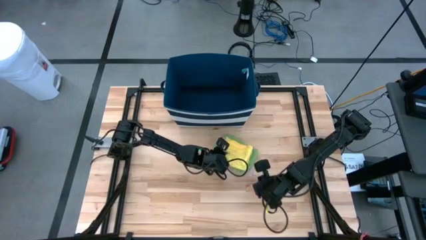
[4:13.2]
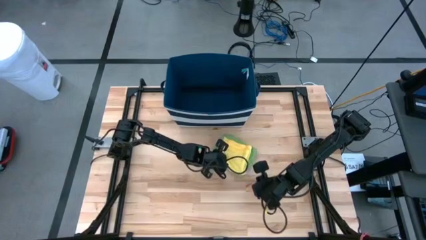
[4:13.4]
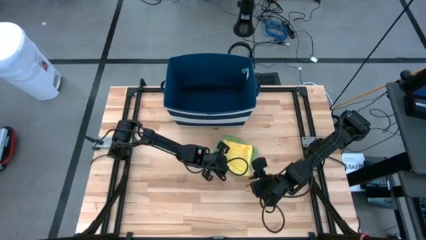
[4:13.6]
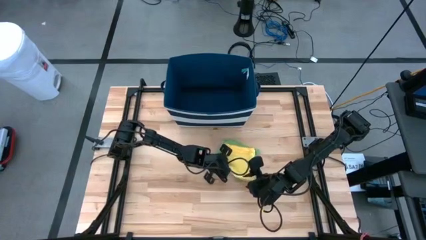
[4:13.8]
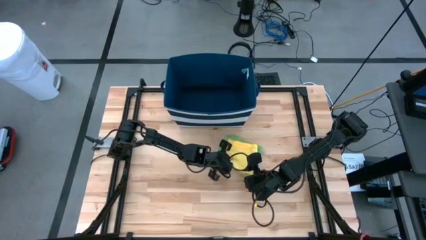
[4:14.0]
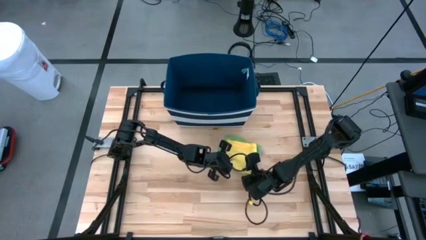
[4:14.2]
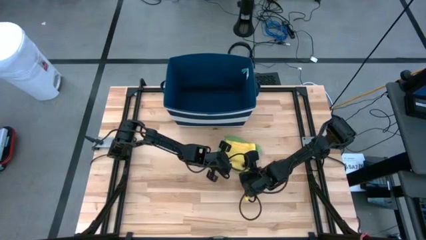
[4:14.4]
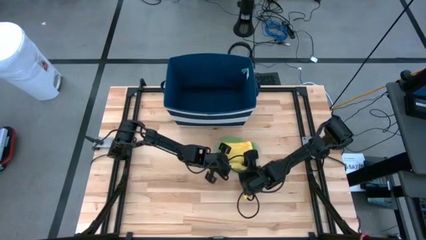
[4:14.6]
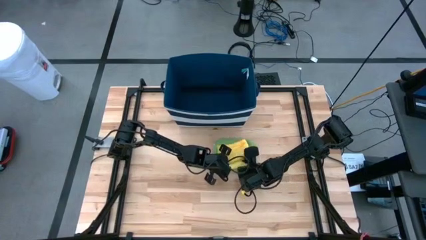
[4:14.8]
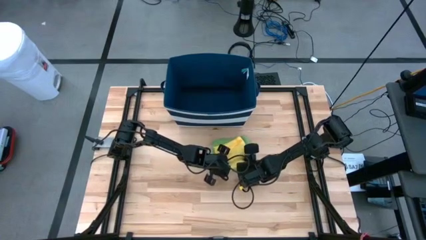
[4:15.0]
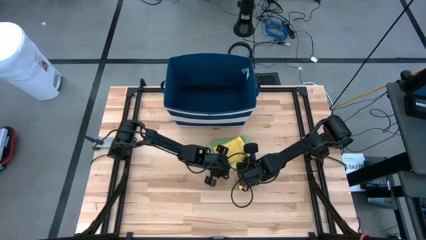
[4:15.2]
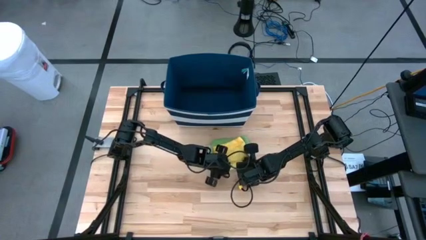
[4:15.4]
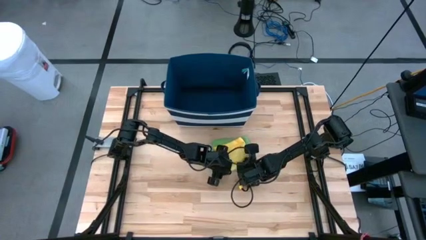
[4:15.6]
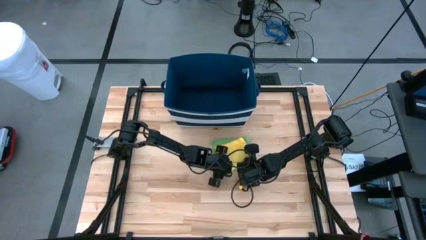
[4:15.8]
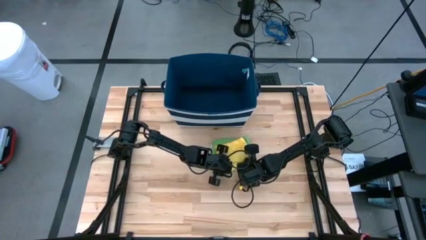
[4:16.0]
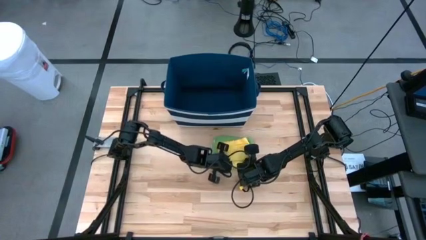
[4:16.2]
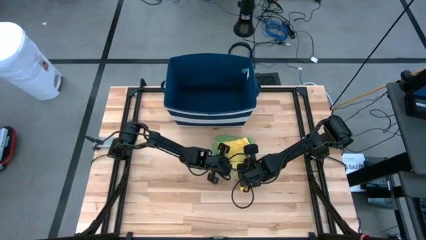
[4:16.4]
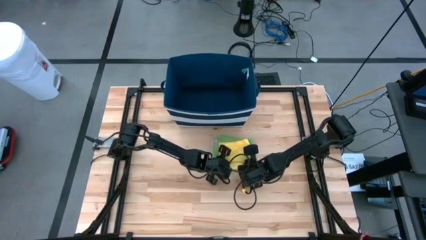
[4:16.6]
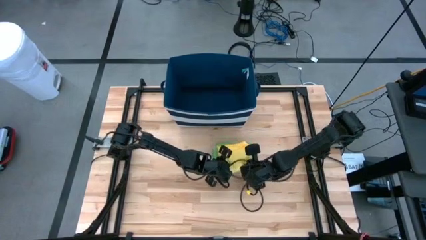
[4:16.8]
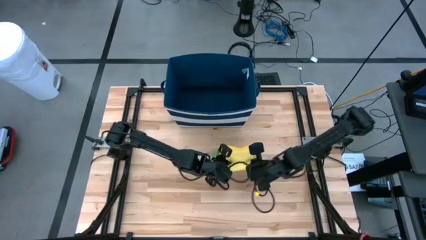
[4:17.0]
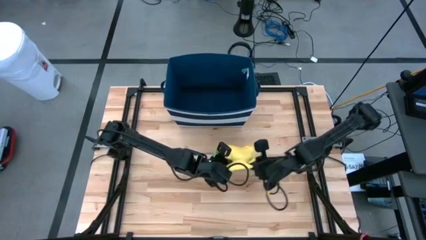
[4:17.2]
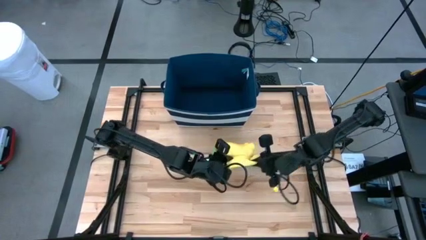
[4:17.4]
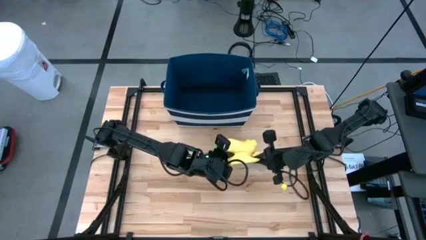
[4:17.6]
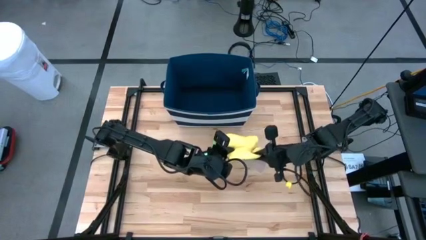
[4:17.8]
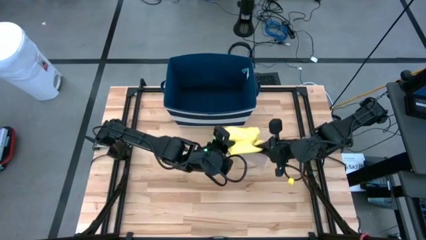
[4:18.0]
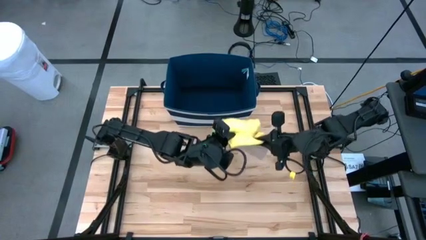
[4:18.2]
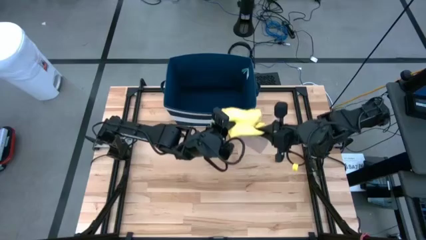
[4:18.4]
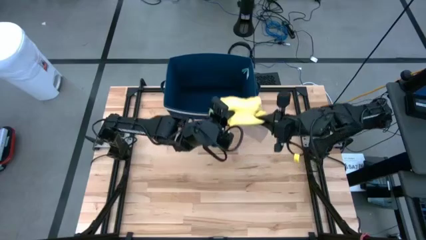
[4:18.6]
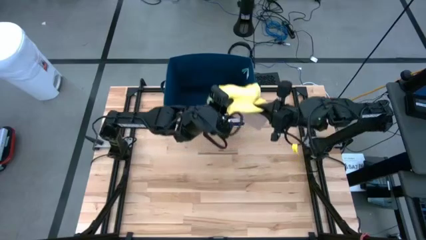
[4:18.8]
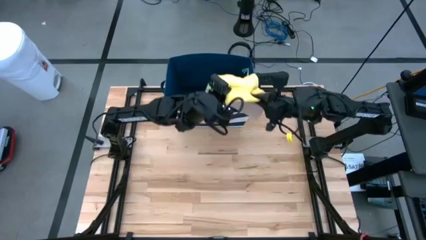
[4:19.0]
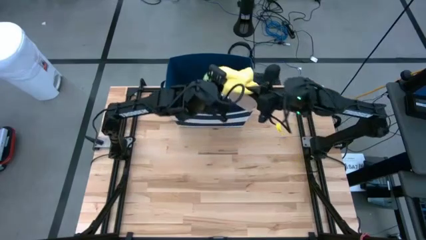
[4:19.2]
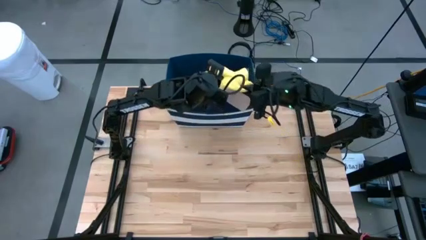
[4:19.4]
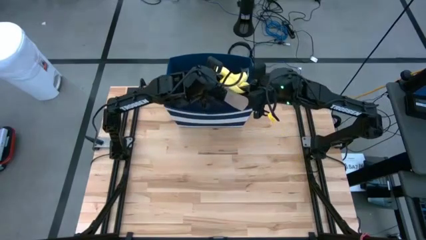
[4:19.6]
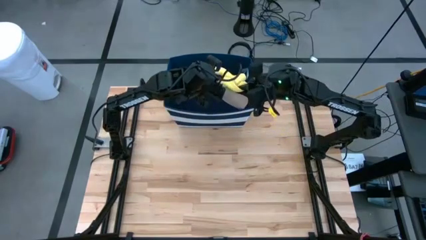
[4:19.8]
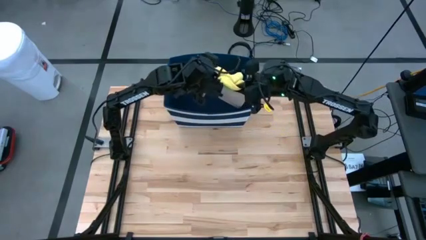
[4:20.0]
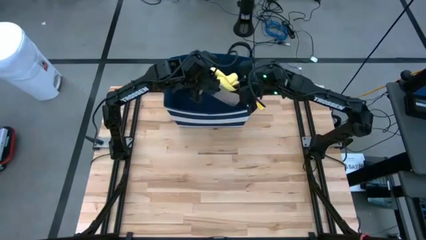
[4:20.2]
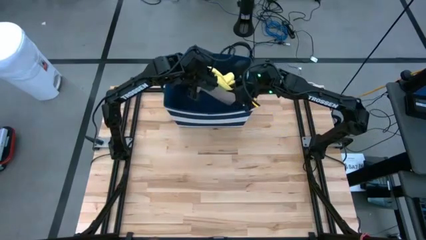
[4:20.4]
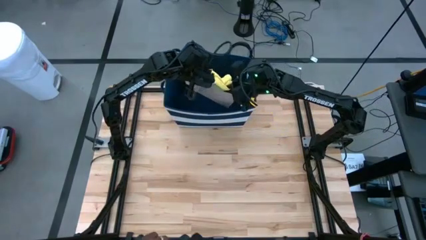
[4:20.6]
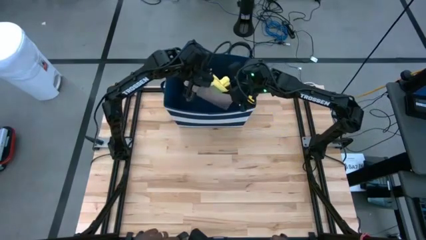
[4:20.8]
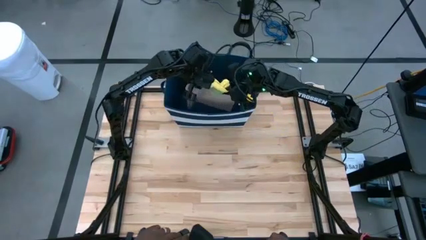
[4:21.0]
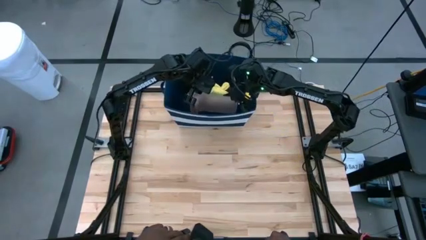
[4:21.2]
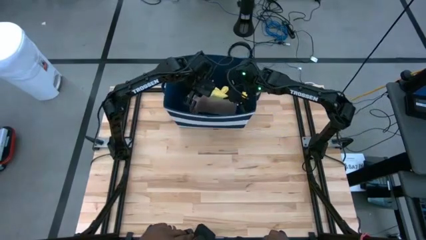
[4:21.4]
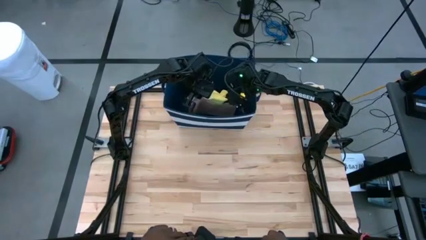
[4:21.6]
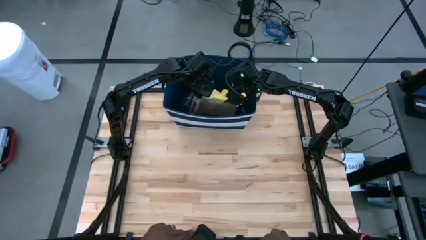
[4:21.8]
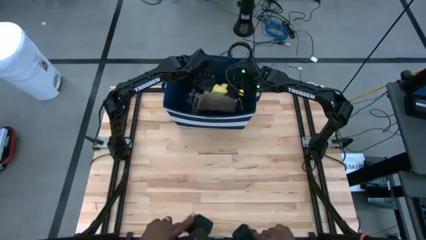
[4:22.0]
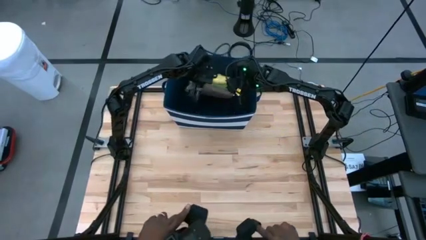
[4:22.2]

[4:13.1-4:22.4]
Task: Fold towel
Put the stacked towels into the blue bin

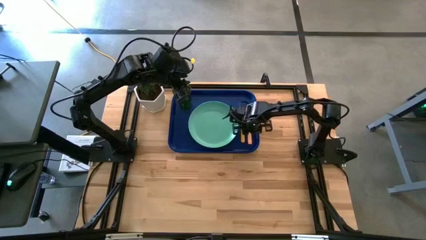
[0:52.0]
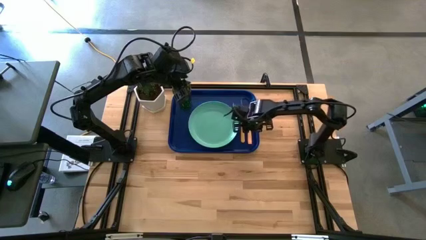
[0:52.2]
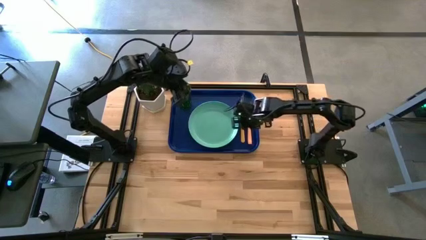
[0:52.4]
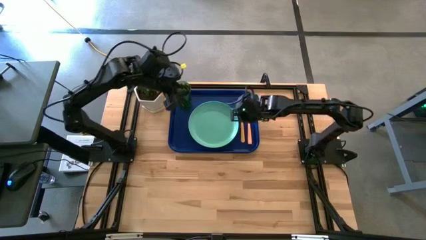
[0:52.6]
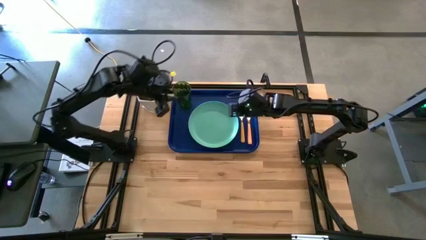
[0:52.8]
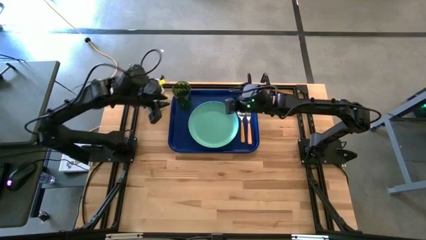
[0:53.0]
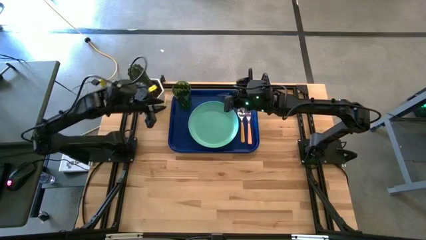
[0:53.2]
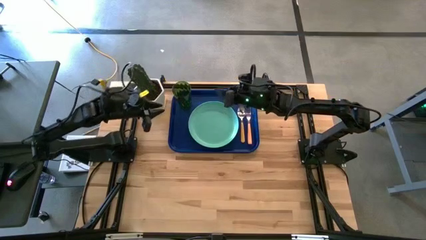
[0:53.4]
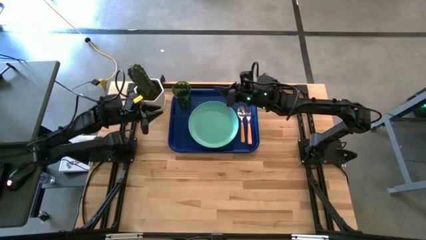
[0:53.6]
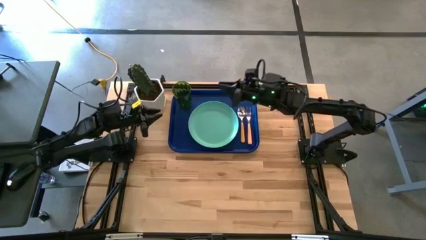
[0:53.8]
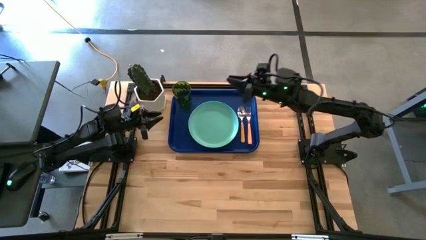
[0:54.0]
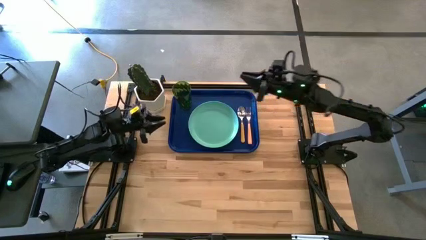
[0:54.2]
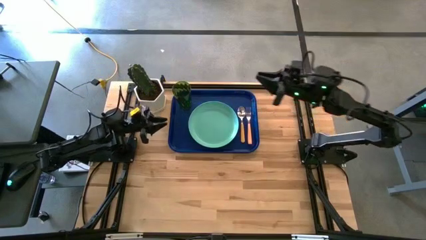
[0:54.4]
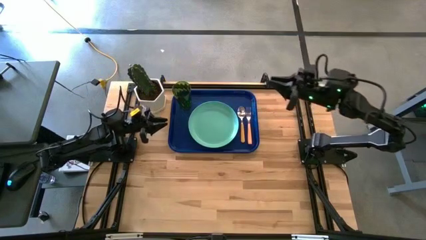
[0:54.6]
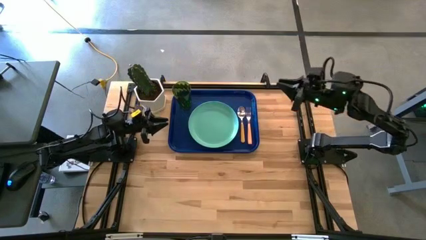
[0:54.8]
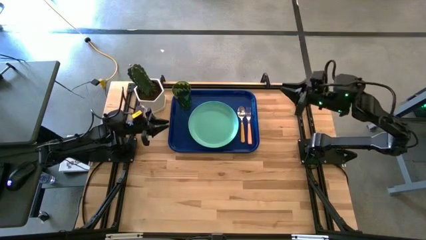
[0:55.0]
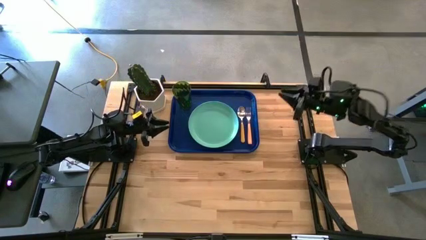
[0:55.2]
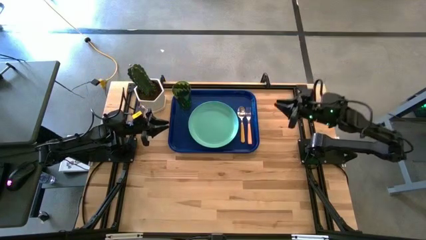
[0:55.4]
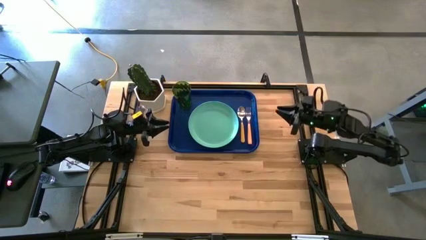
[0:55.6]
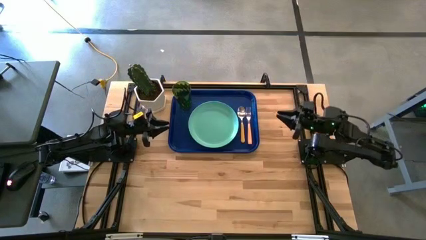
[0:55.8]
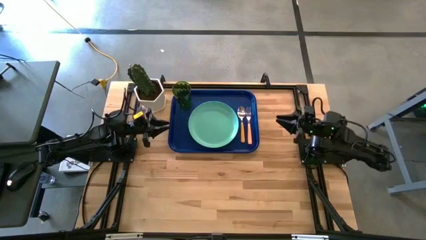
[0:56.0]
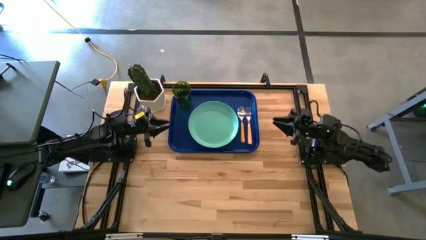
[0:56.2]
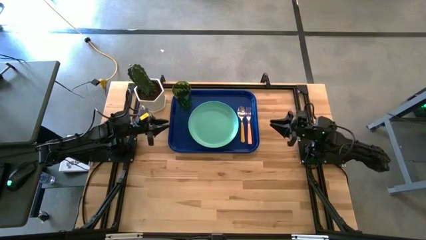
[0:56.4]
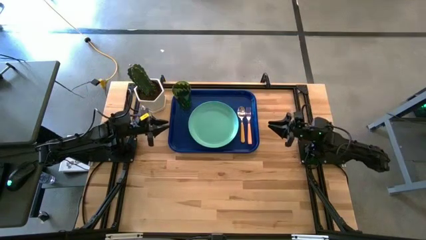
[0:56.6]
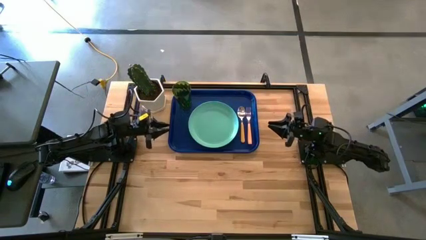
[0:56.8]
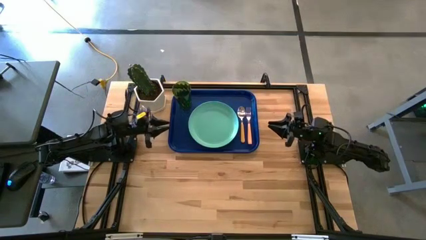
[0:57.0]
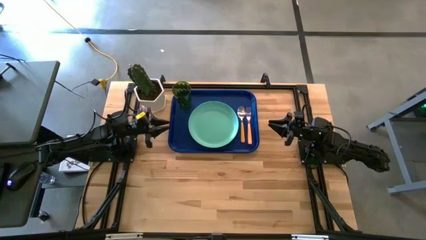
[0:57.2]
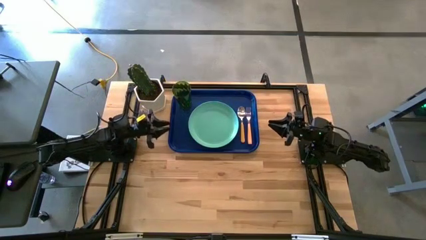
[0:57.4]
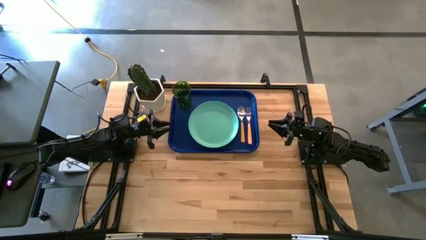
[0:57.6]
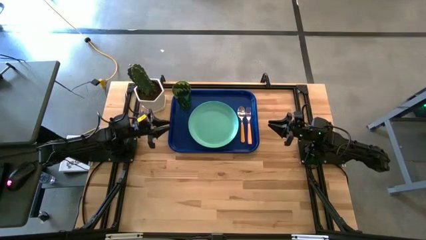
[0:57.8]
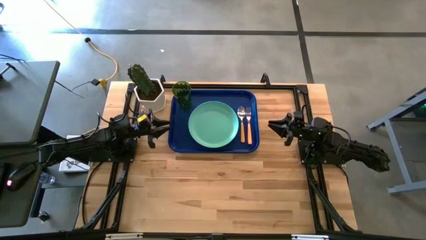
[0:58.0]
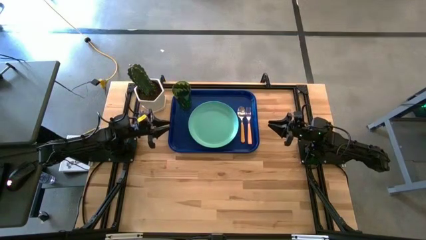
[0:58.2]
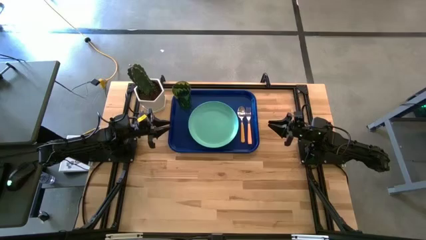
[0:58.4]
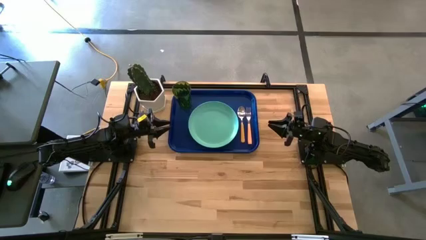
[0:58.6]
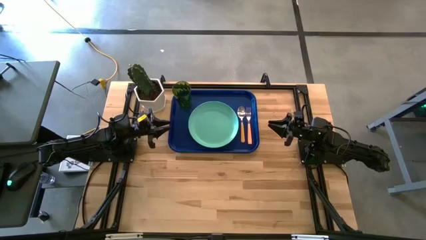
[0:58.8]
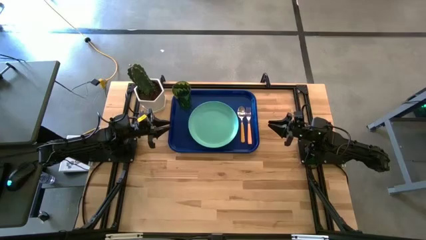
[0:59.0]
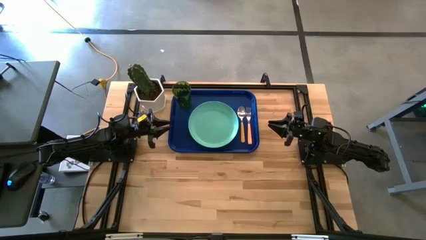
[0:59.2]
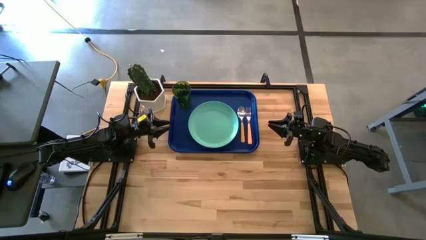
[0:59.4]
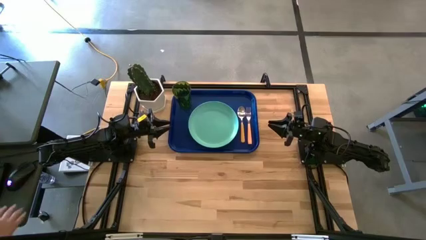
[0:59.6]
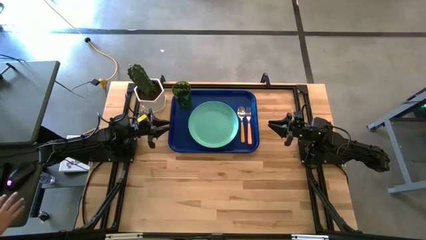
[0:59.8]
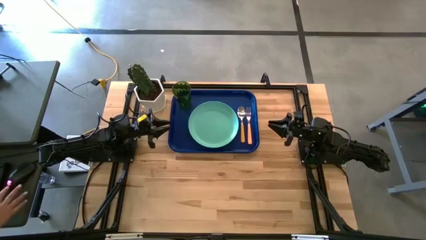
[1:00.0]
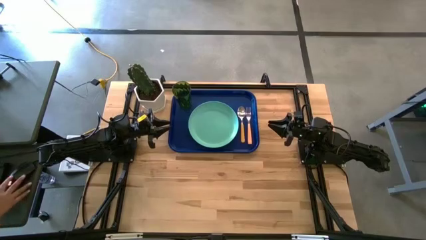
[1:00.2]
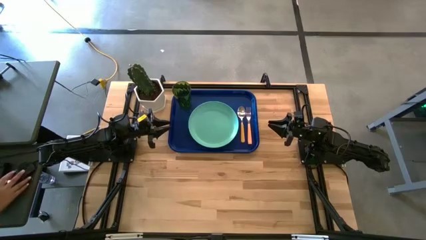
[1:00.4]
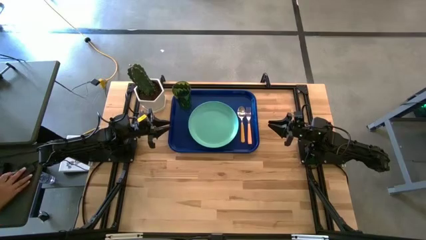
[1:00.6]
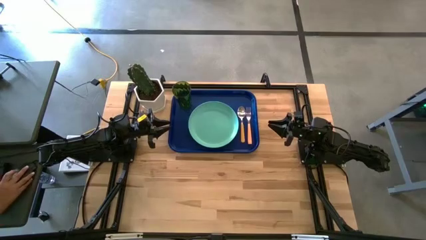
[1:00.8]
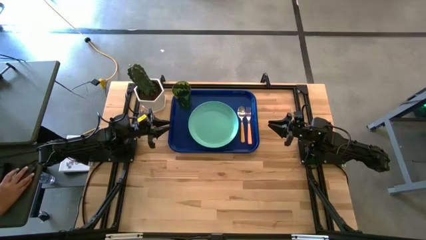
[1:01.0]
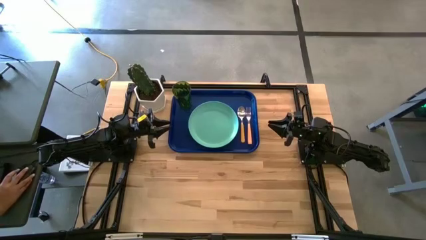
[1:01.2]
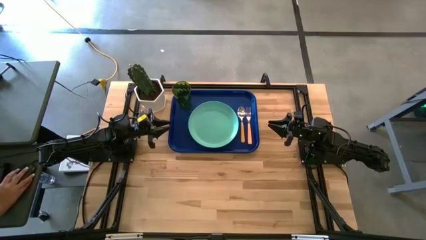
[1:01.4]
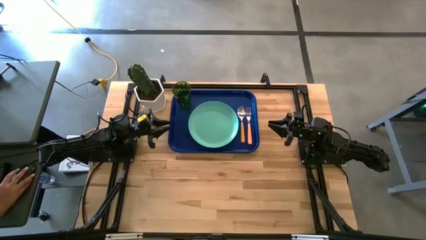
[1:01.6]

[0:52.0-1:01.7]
Task: Pick and place plate/cup/fork/spoon on tray
Return to Home Position
